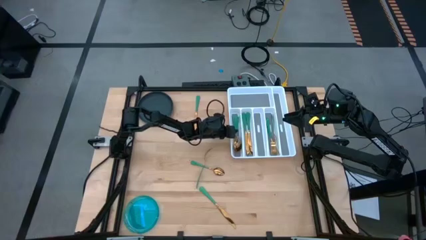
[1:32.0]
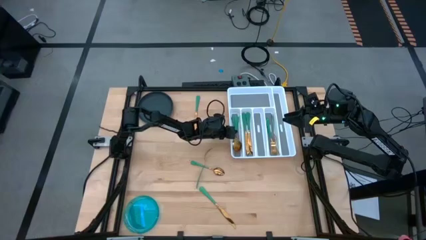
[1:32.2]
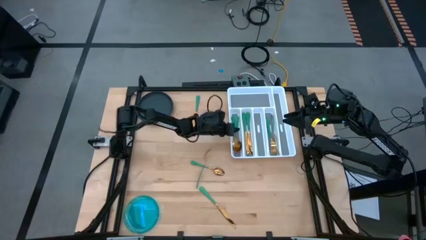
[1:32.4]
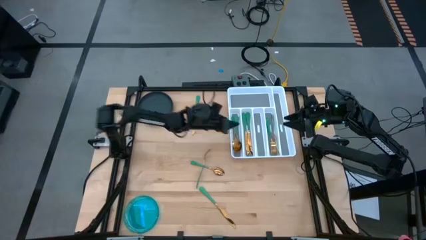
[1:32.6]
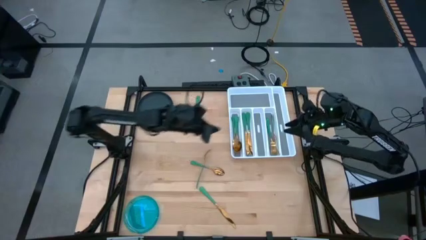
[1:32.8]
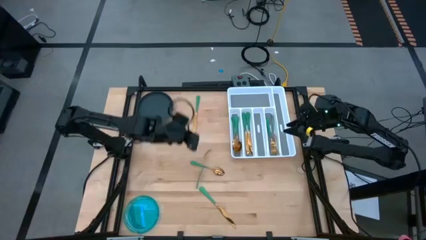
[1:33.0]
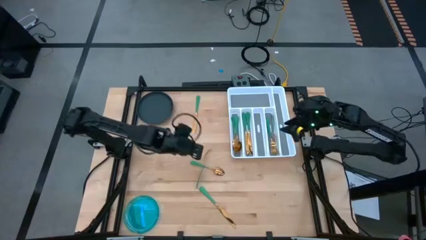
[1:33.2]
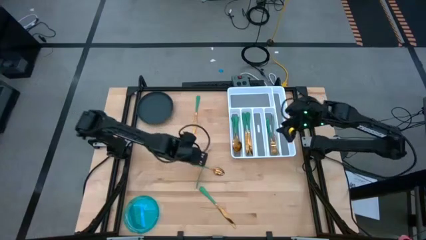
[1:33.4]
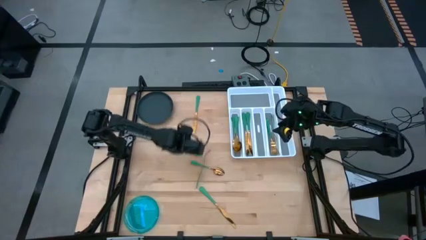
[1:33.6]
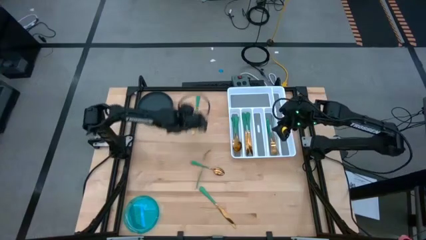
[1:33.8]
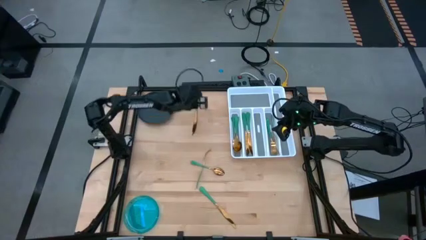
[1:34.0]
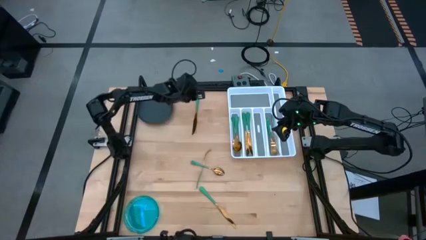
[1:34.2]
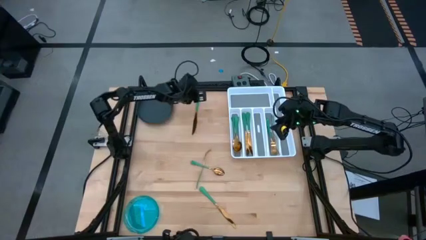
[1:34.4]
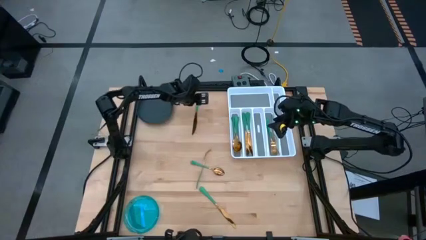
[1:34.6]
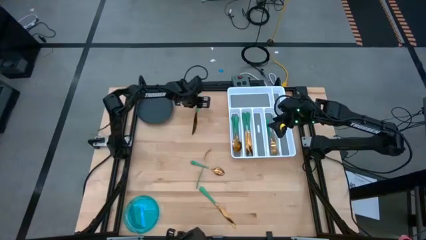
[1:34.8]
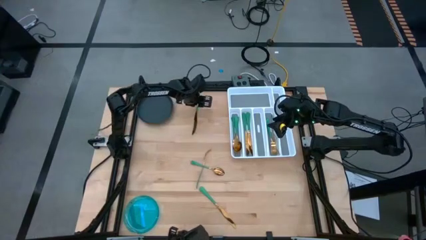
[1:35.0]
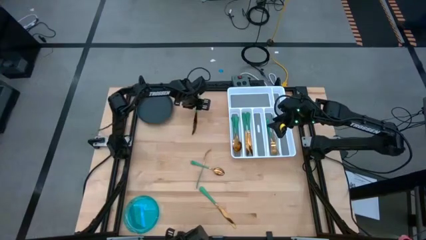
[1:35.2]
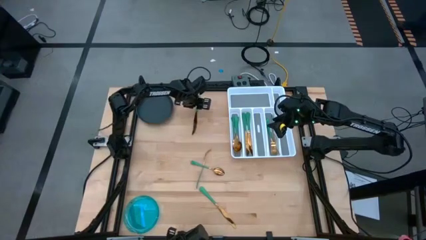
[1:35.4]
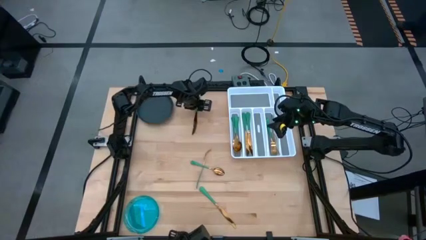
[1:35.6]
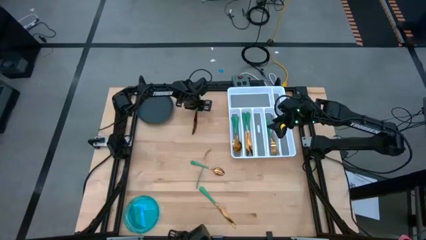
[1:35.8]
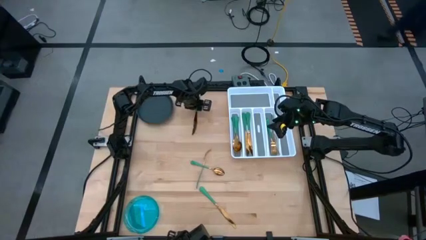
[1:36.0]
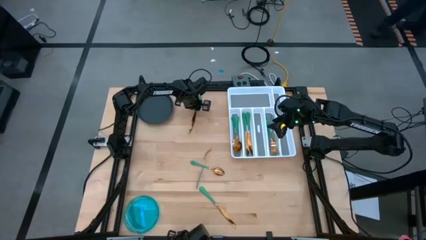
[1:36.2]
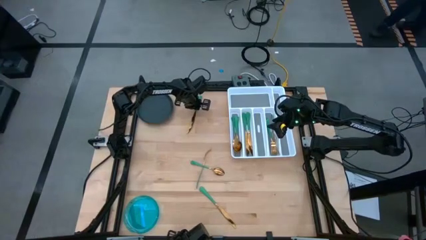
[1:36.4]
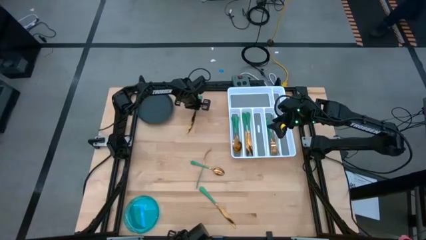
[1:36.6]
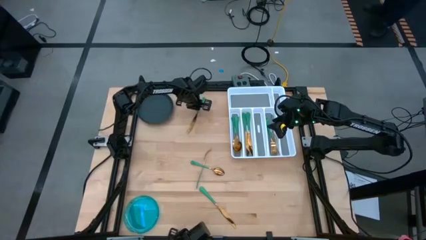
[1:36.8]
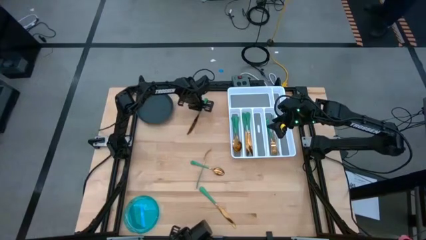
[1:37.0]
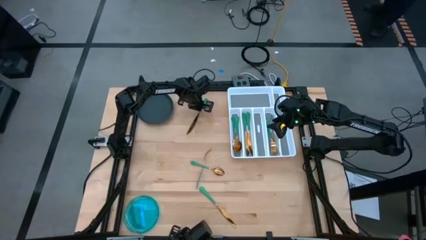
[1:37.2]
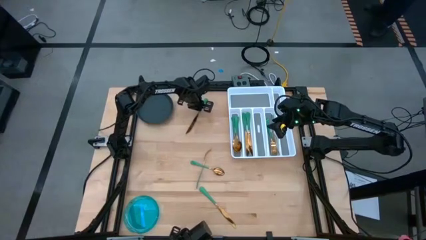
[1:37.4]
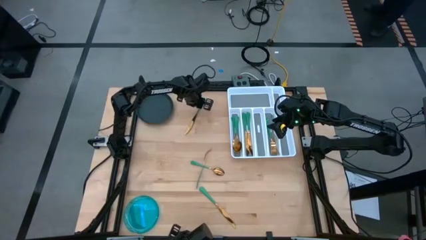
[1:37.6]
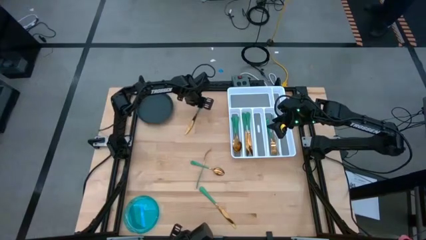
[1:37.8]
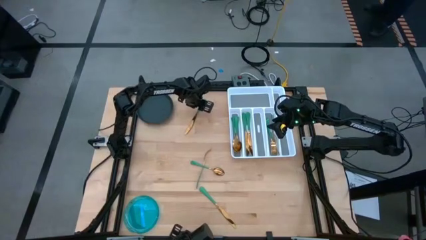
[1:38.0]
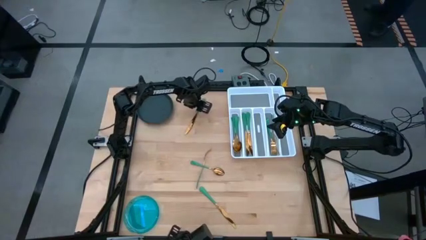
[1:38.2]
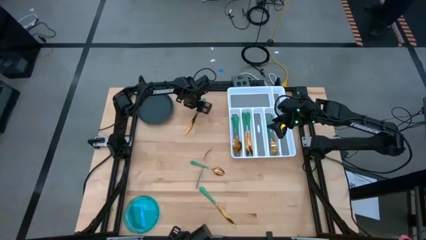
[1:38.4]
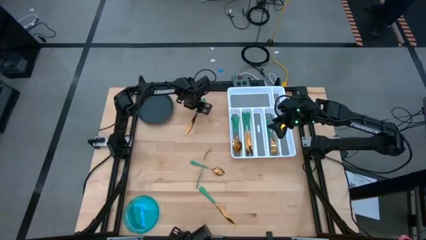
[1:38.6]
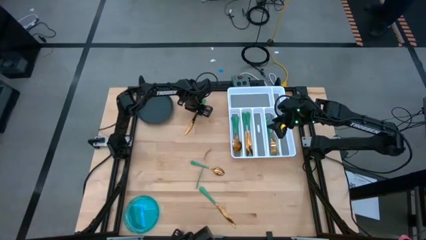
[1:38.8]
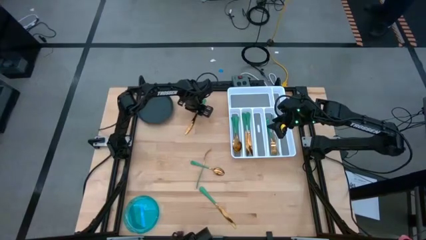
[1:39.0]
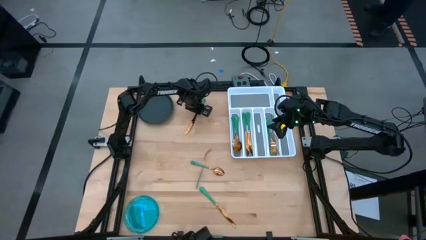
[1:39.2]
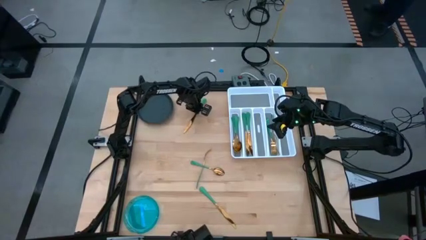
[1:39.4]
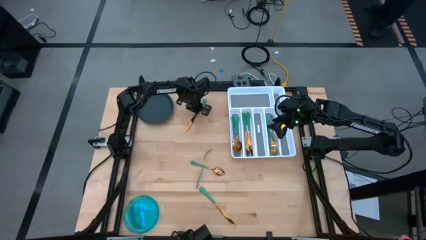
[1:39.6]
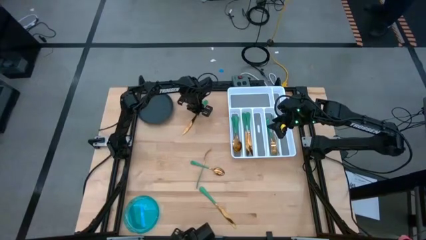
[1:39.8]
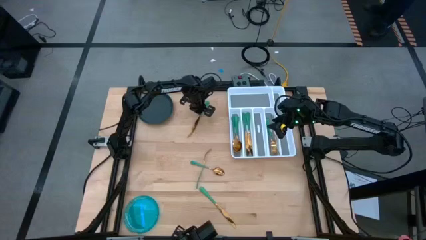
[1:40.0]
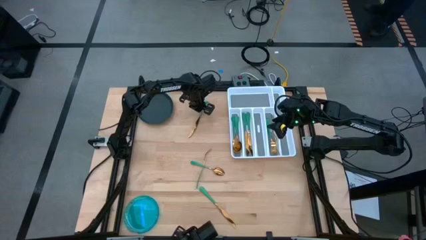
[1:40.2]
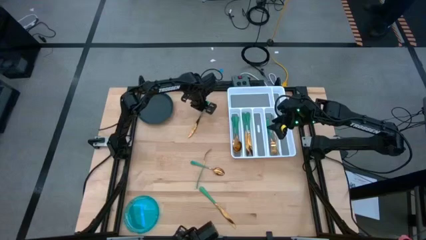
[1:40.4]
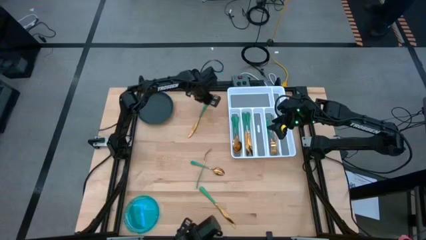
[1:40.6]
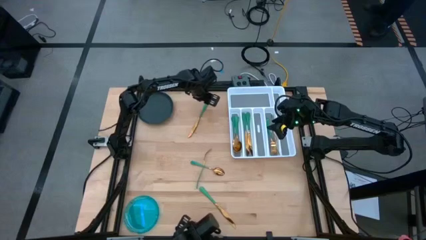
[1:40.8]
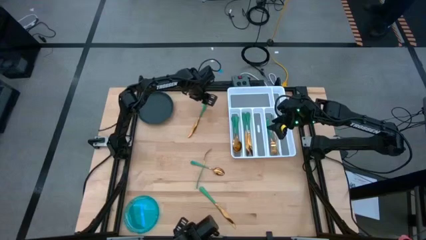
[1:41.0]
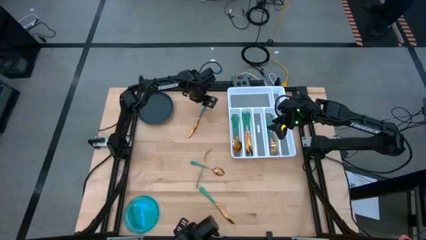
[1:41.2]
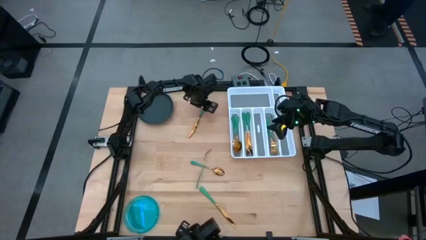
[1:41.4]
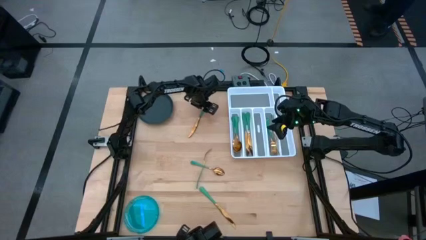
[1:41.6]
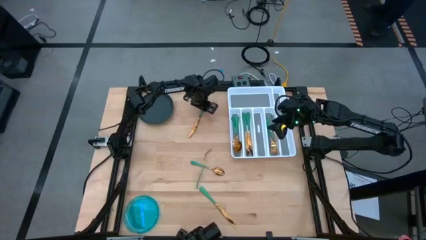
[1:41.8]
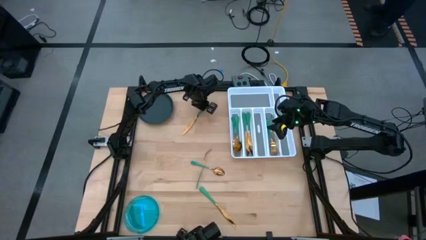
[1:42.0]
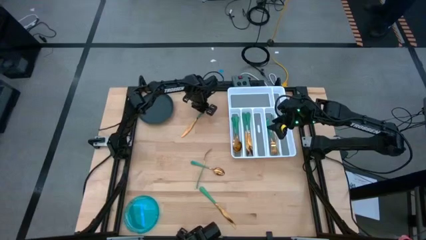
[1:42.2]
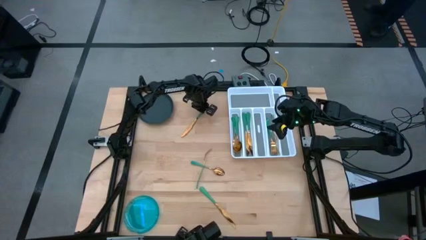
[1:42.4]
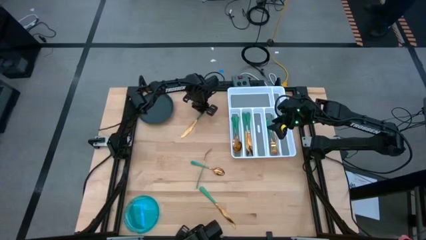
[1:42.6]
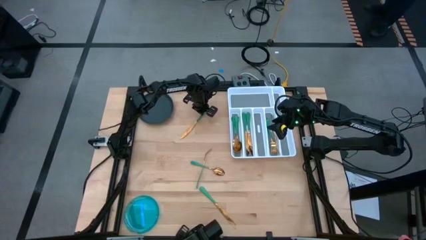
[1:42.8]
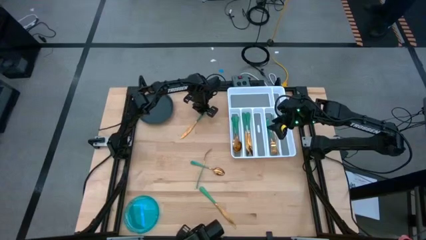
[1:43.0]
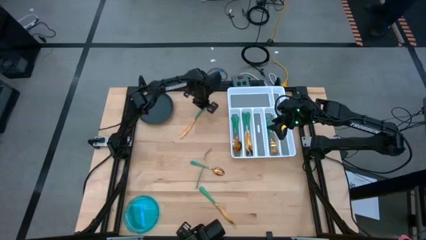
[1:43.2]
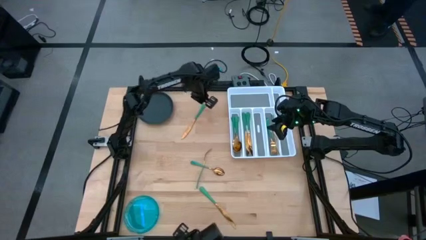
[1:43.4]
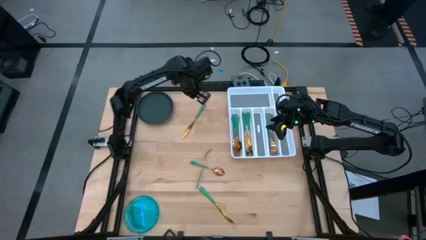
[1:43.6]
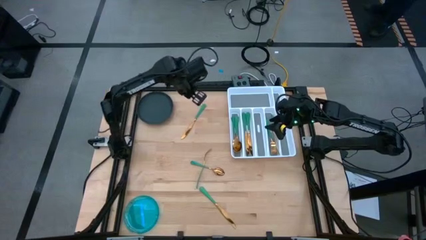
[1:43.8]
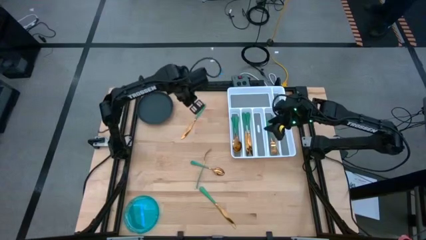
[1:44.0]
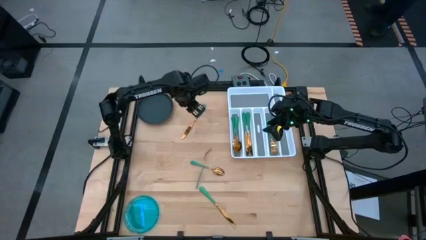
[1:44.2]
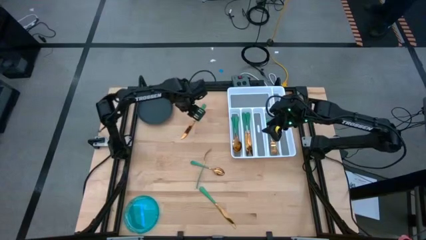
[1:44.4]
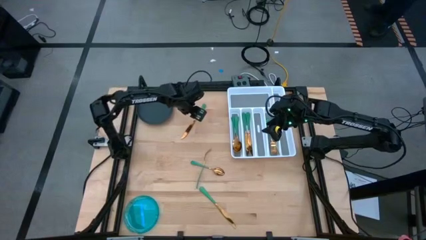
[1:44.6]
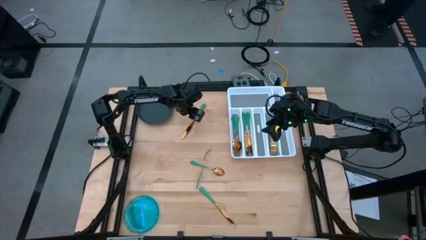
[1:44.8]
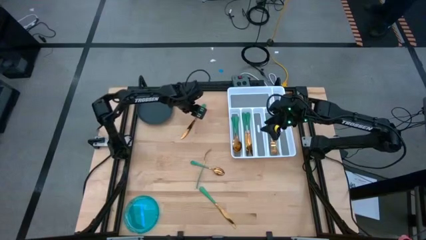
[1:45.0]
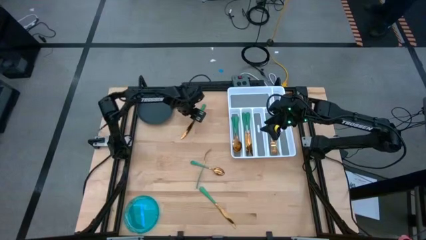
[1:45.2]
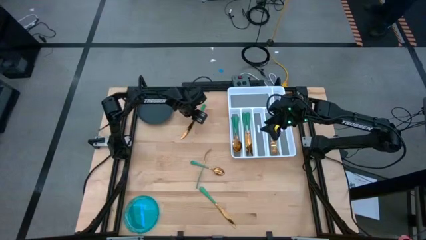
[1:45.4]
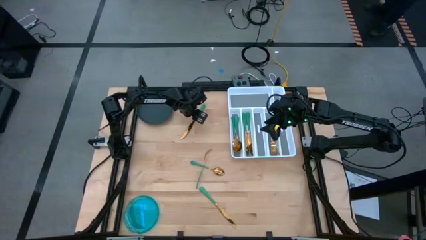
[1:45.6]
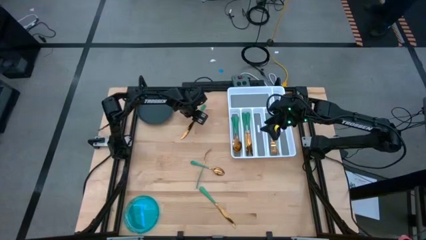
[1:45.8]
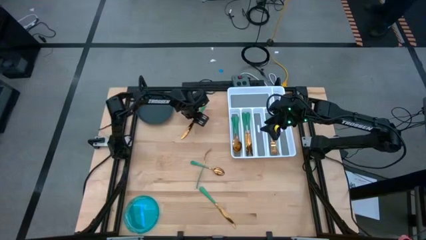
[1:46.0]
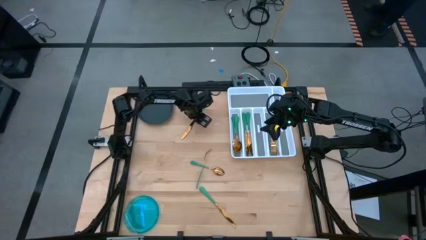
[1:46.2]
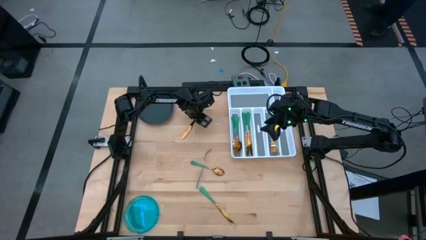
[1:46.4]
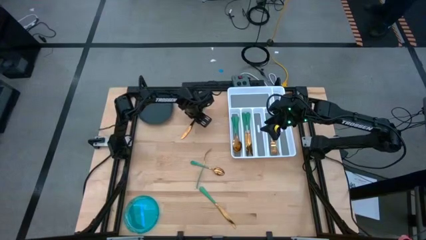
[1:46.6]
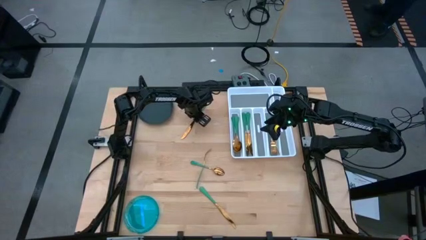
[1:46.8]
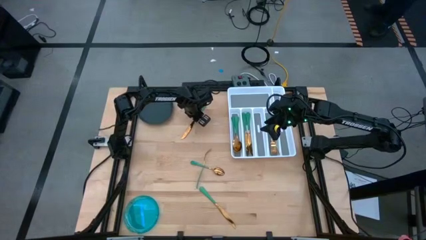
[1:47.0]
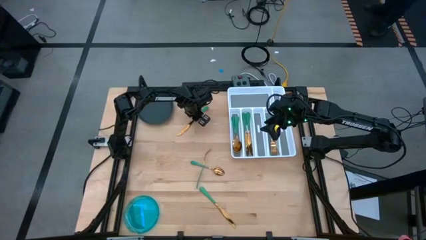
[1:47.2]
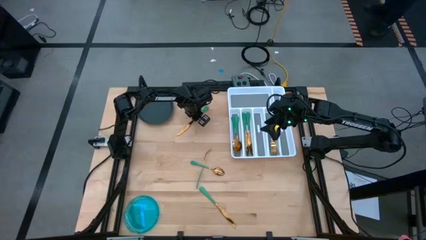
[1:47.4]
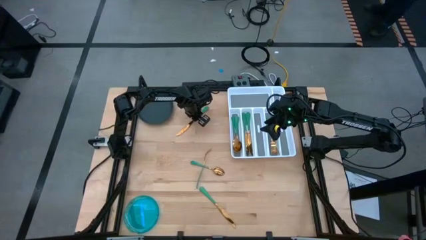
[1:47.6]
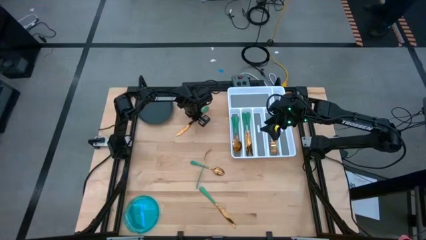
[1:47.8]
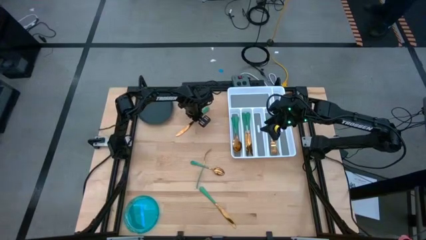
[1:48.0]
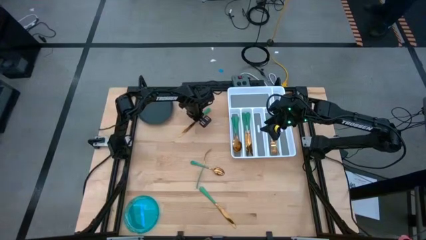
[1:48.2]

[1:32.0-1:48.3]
Task: Sort silverware
Put the top green knife on the silverware tray with the other green knives
